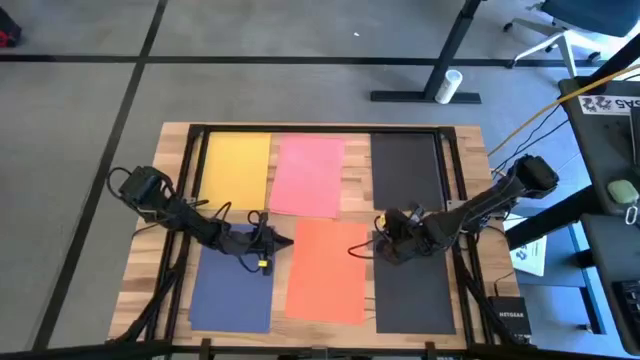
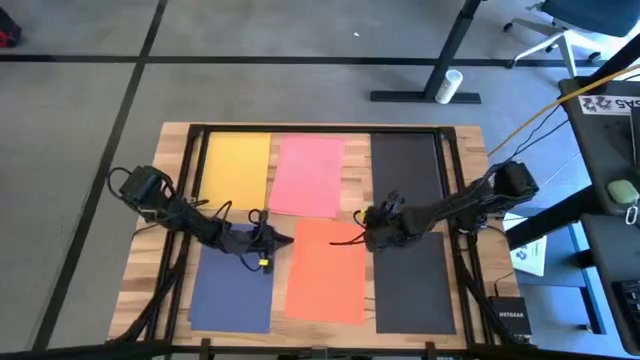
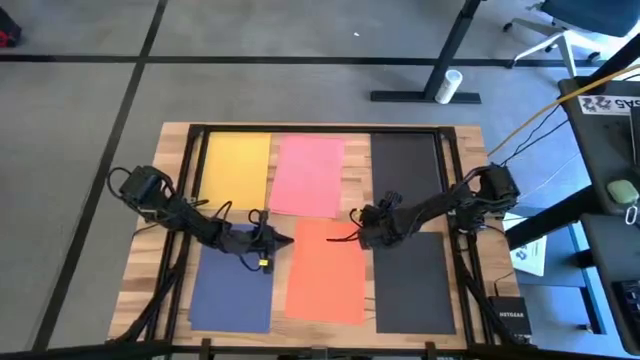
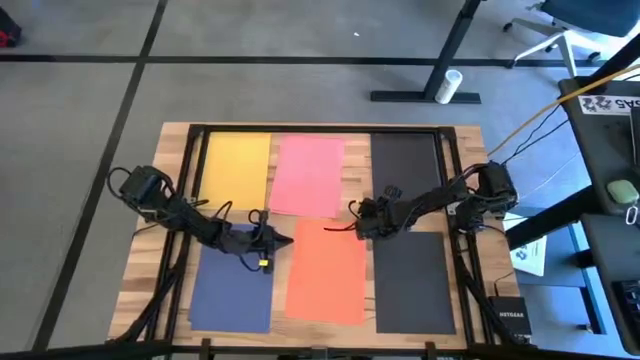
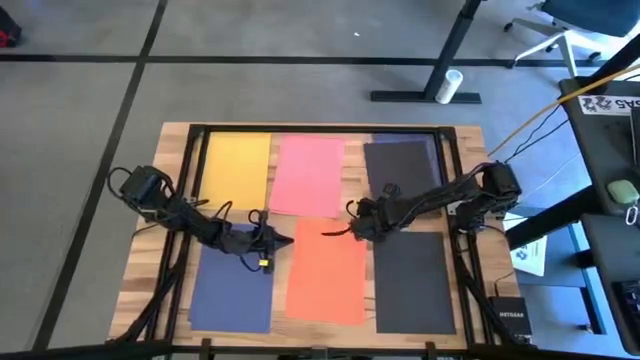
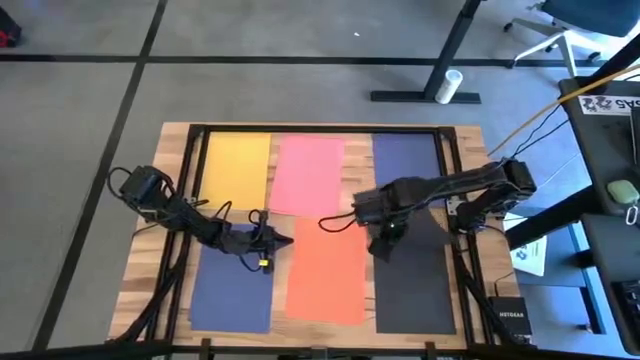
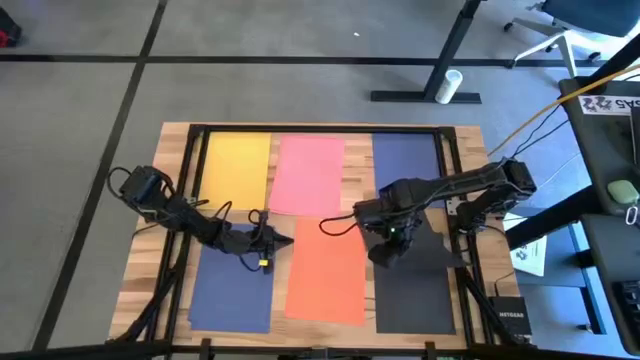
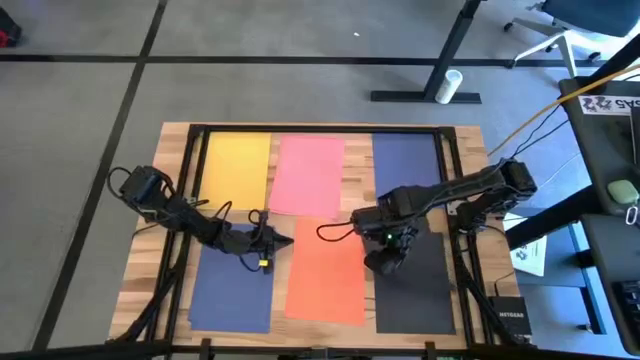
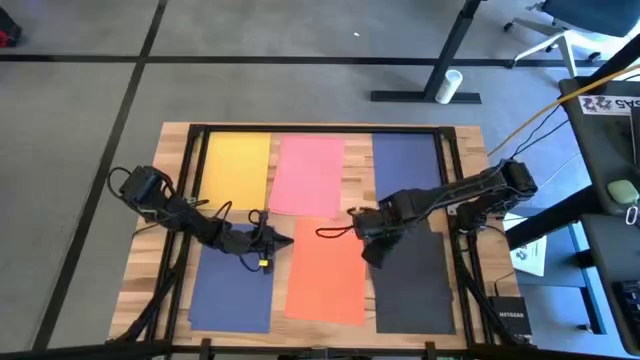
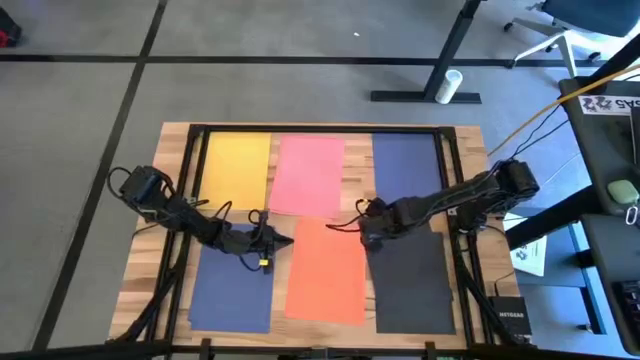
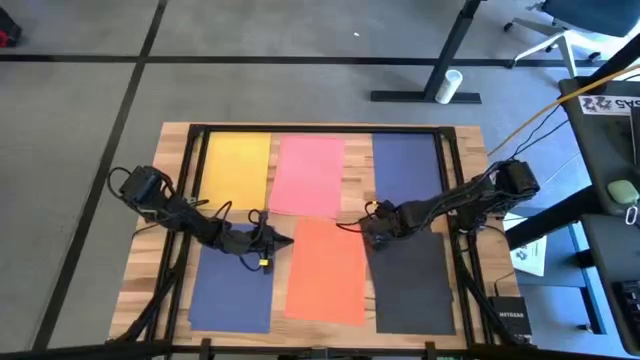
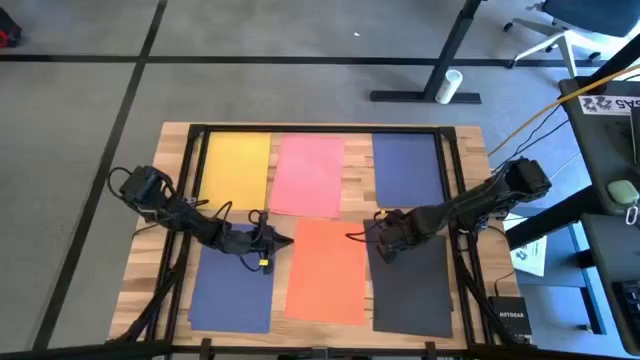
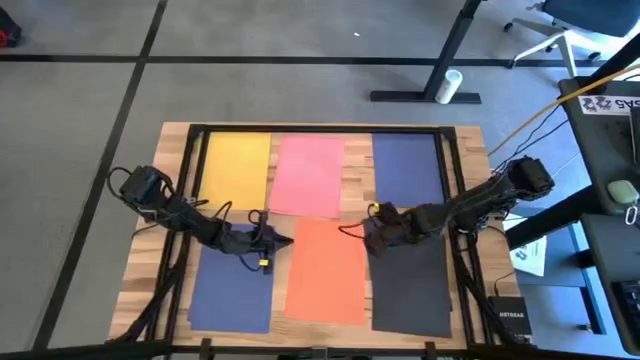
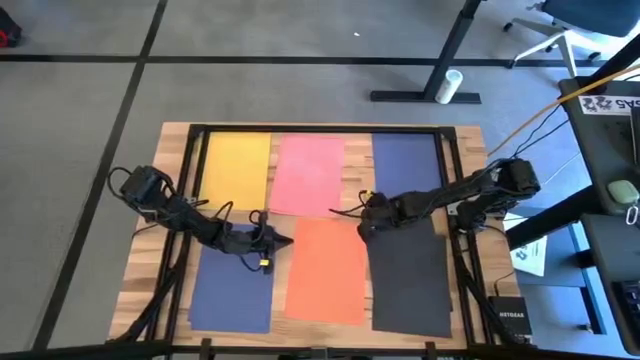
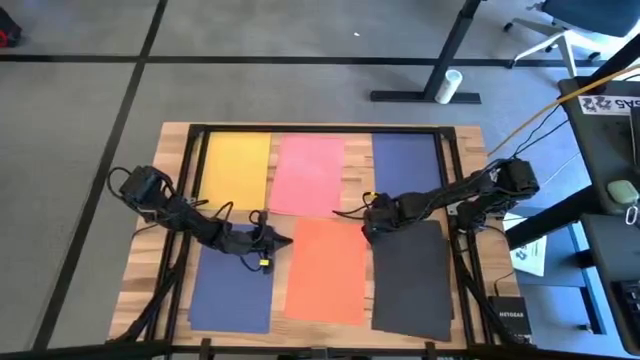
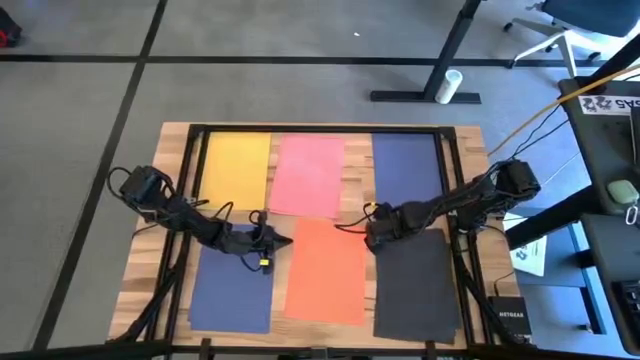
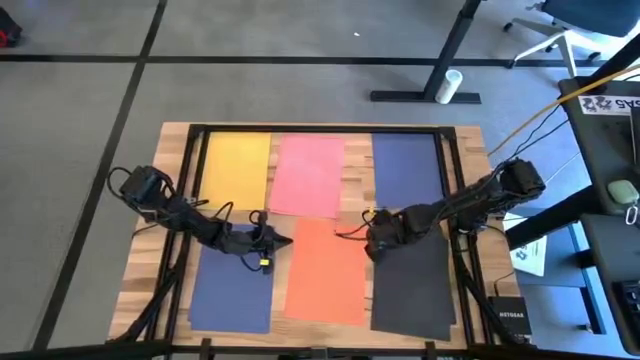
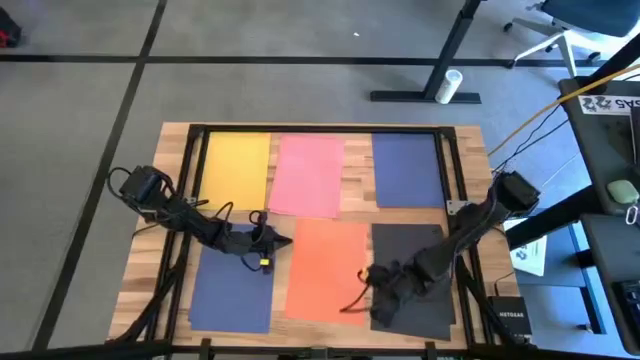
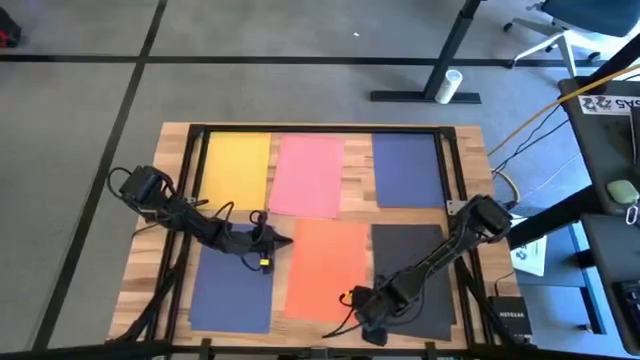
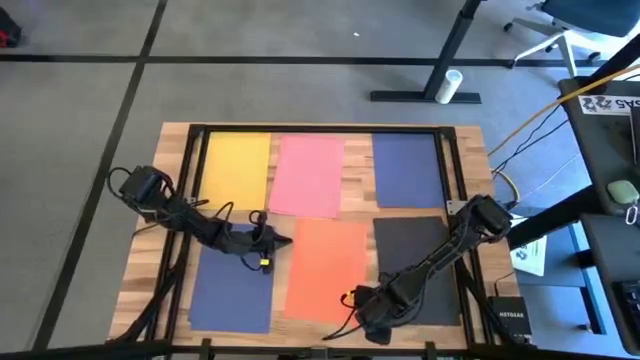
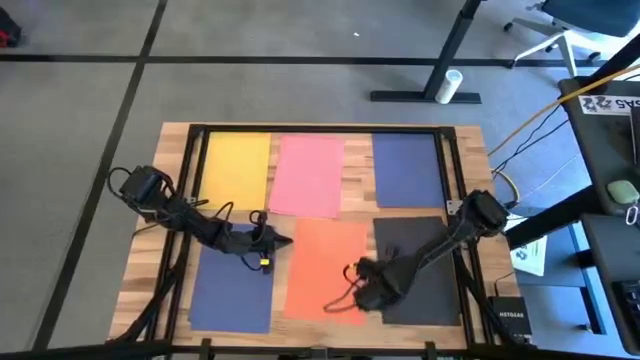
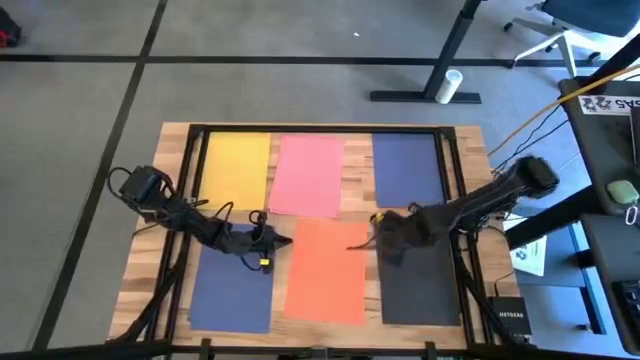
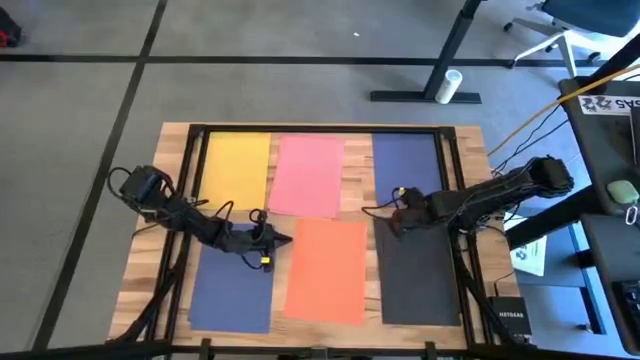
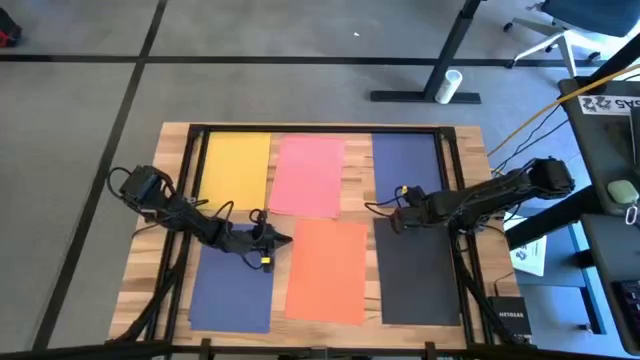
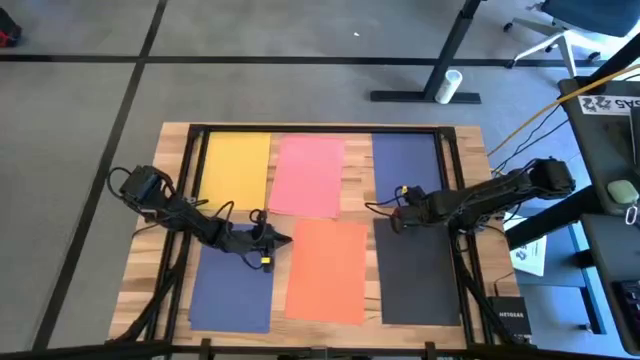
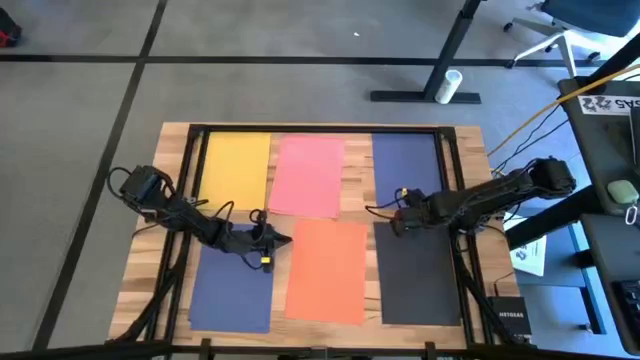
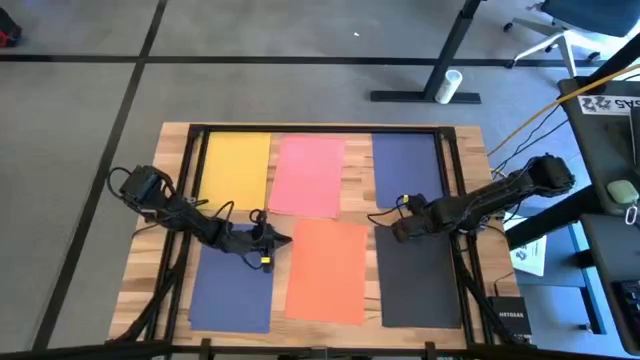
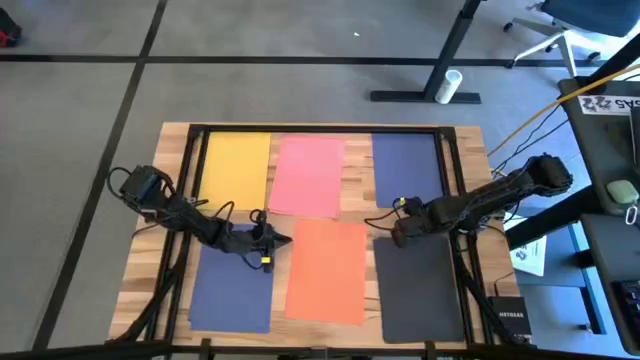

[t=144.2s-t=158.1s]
Task: Organize paper
Stack the black paper on top of the black paper

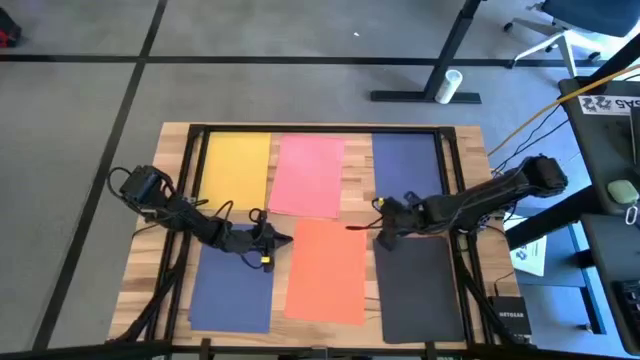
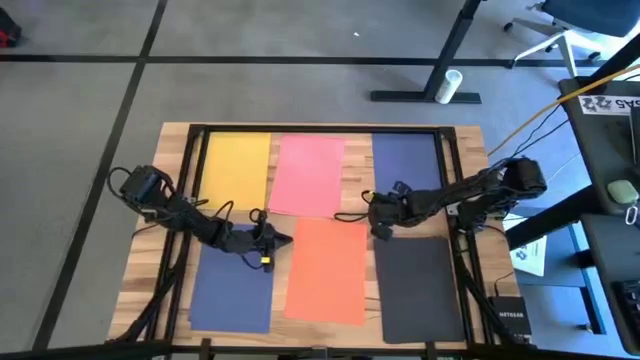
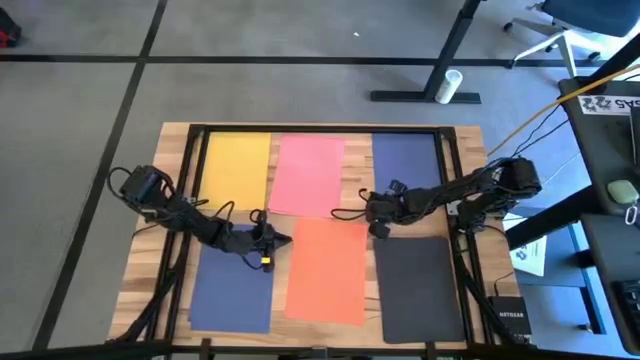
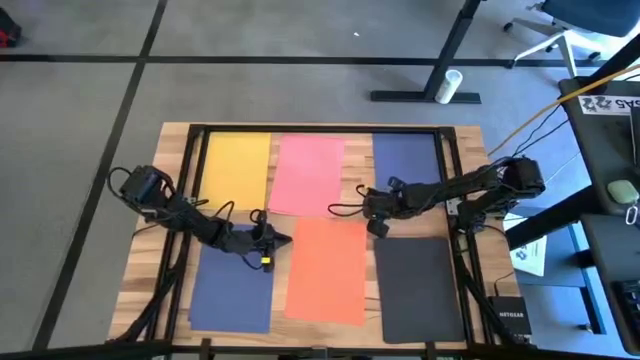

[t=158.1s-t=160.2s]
Stack the violet paper on top of the stacked violet papers
